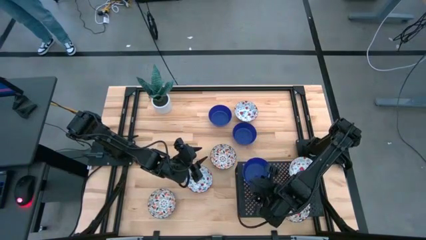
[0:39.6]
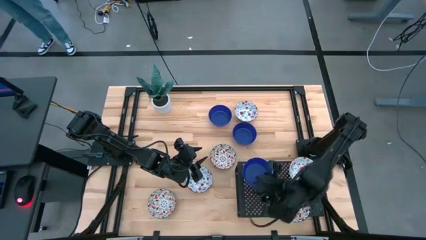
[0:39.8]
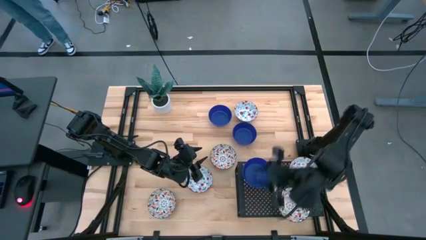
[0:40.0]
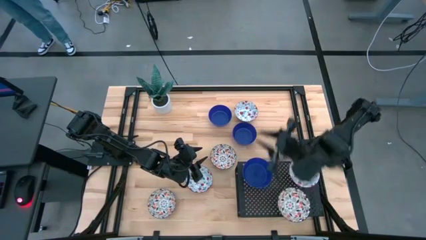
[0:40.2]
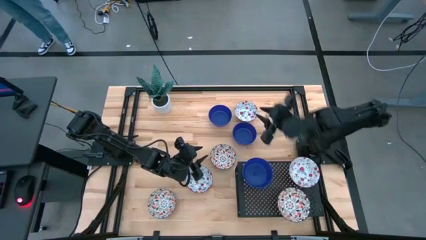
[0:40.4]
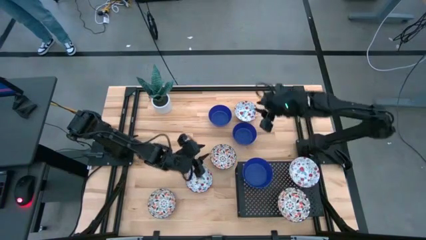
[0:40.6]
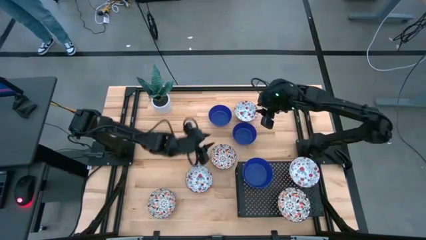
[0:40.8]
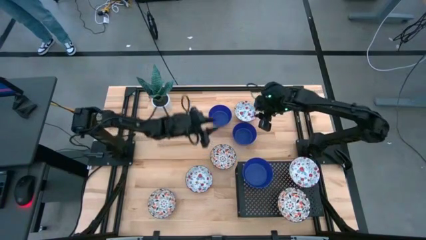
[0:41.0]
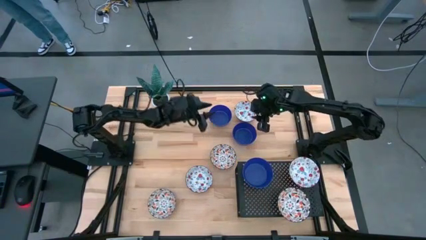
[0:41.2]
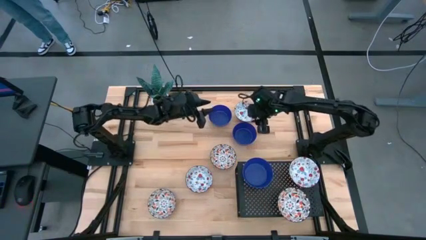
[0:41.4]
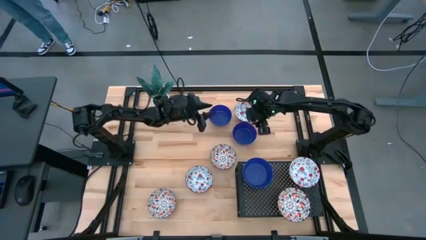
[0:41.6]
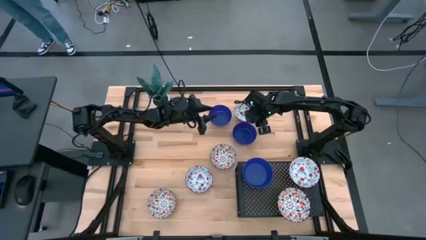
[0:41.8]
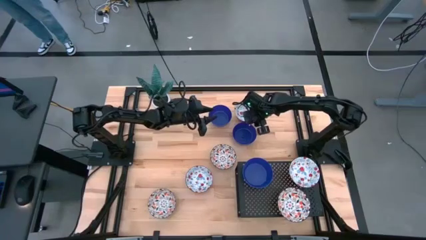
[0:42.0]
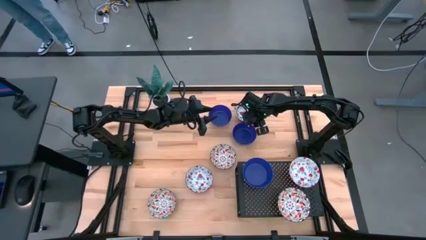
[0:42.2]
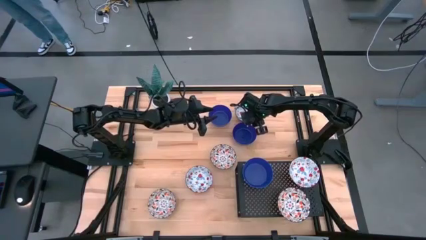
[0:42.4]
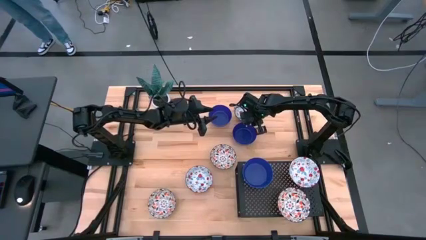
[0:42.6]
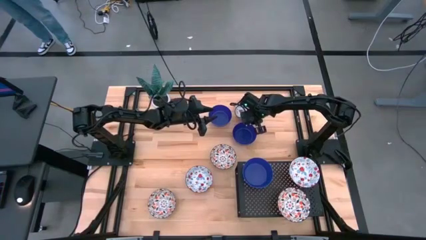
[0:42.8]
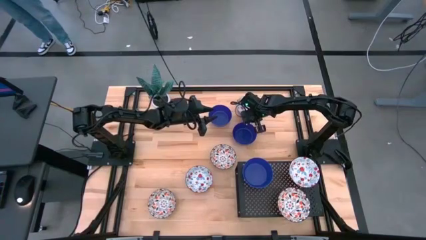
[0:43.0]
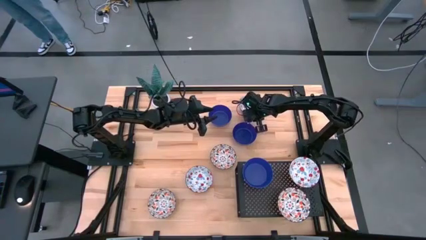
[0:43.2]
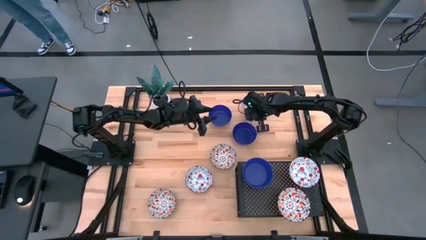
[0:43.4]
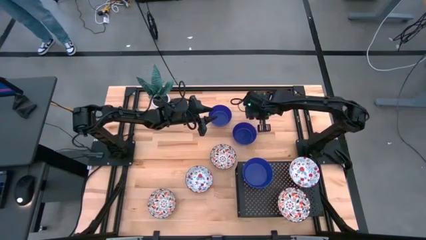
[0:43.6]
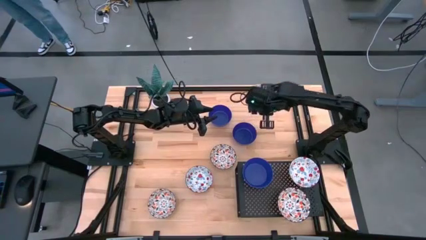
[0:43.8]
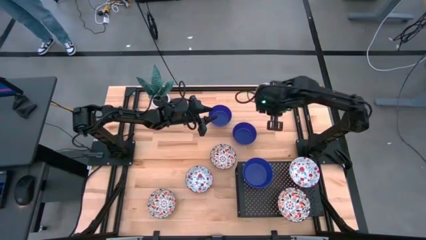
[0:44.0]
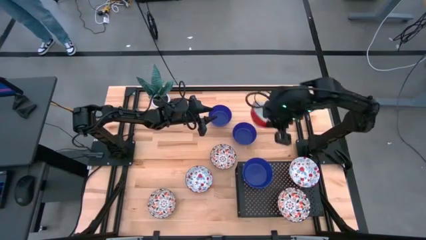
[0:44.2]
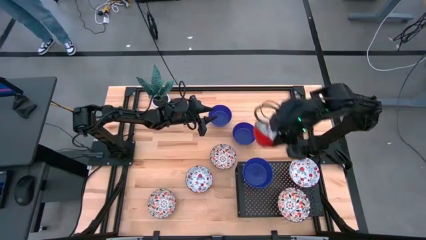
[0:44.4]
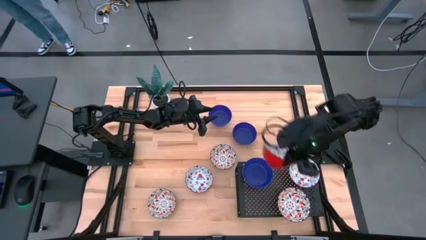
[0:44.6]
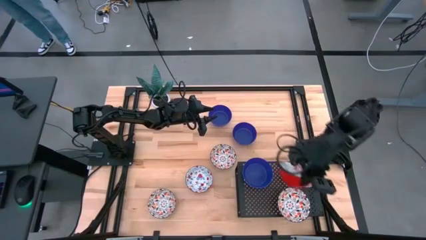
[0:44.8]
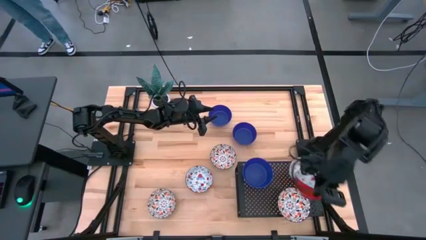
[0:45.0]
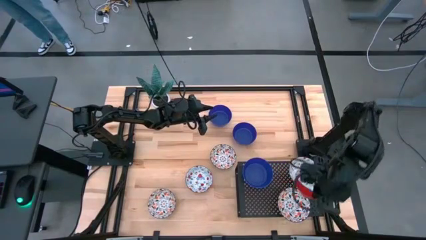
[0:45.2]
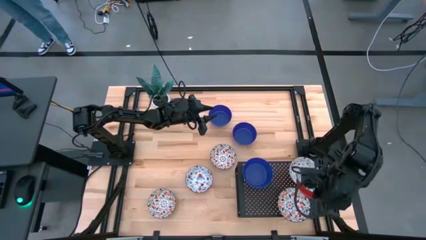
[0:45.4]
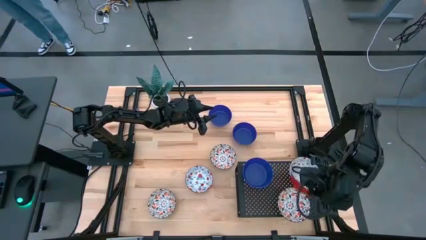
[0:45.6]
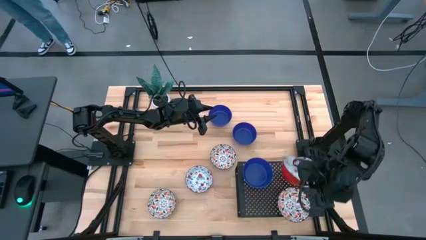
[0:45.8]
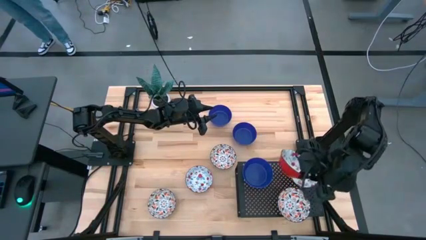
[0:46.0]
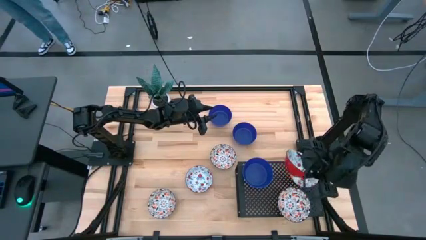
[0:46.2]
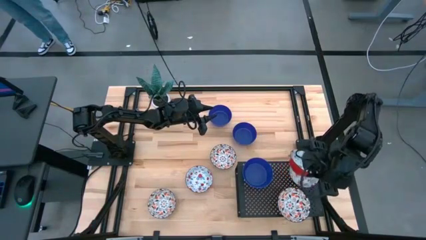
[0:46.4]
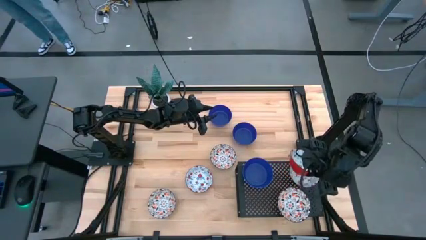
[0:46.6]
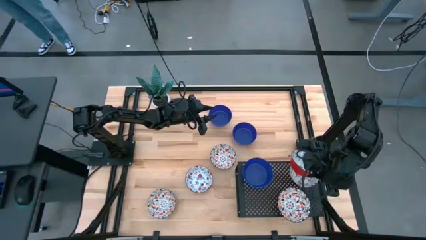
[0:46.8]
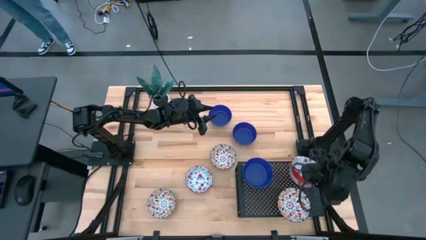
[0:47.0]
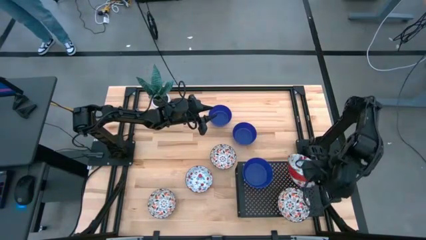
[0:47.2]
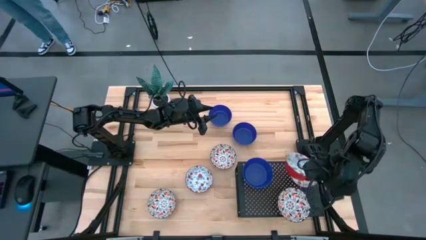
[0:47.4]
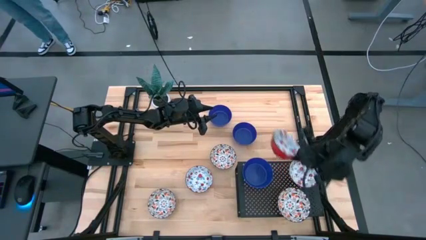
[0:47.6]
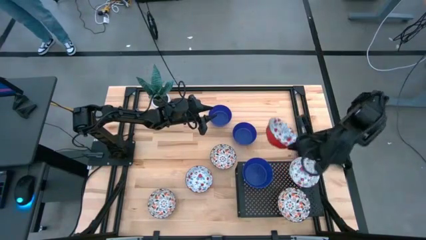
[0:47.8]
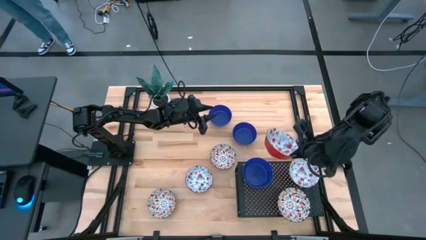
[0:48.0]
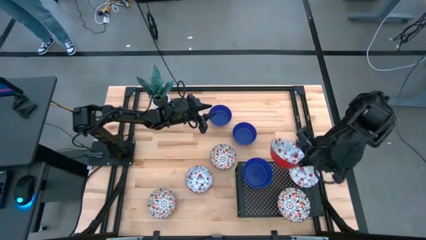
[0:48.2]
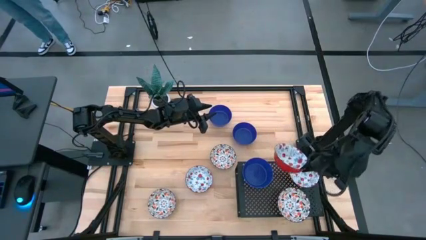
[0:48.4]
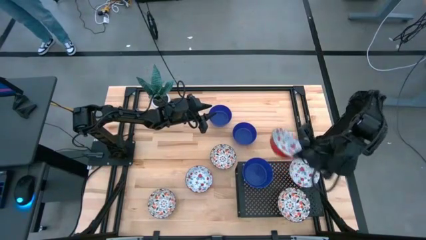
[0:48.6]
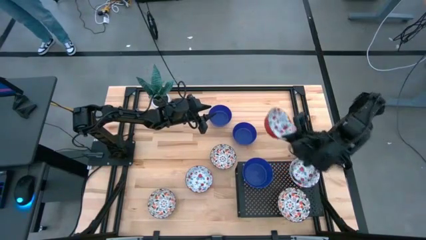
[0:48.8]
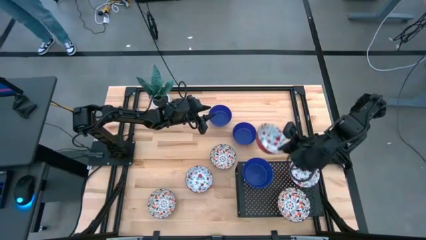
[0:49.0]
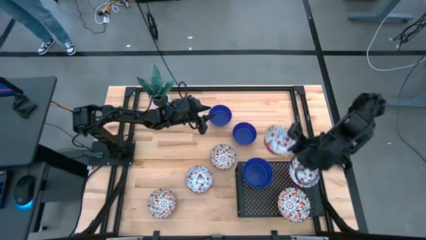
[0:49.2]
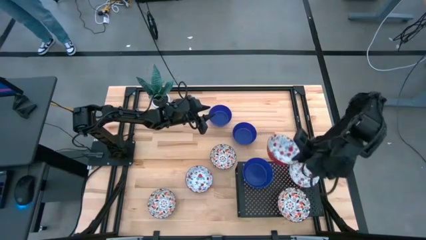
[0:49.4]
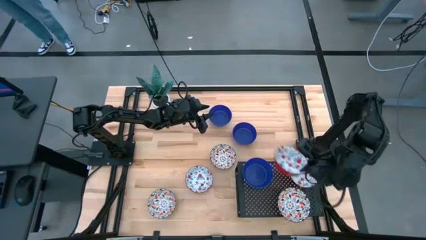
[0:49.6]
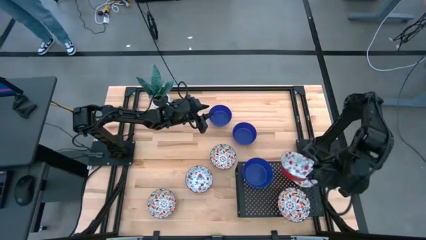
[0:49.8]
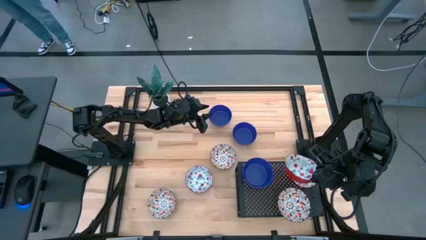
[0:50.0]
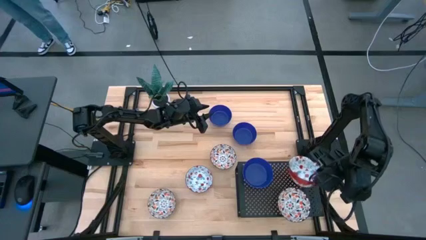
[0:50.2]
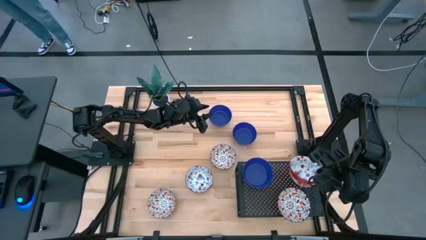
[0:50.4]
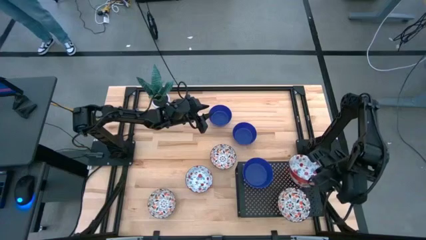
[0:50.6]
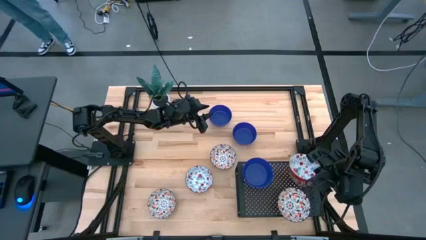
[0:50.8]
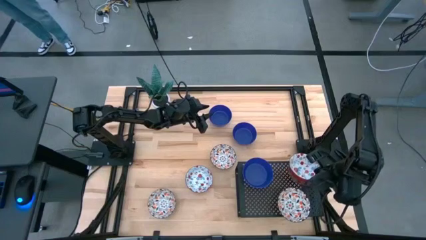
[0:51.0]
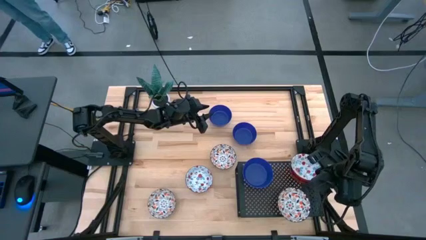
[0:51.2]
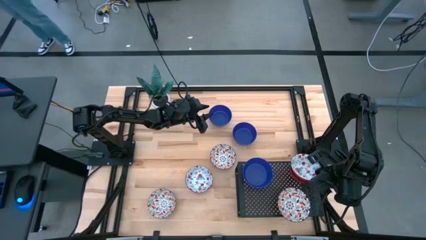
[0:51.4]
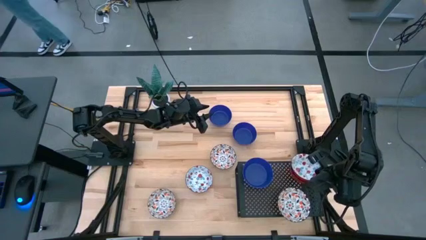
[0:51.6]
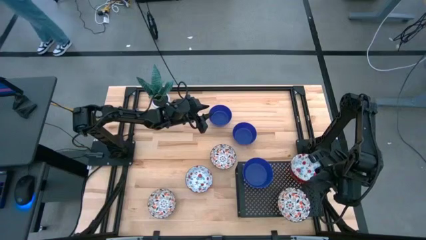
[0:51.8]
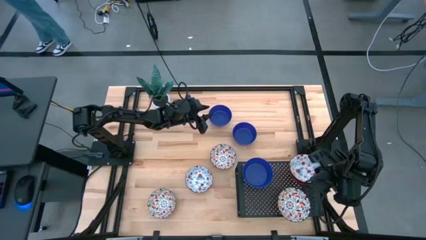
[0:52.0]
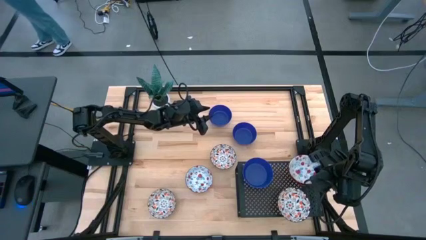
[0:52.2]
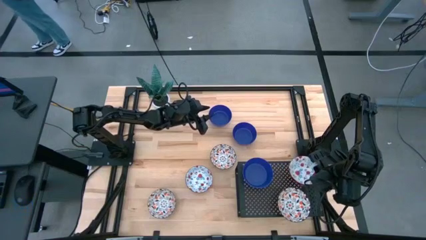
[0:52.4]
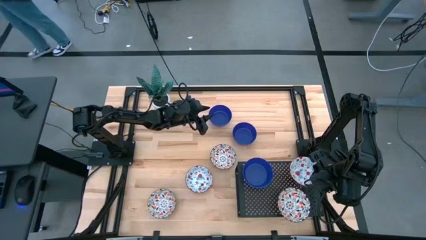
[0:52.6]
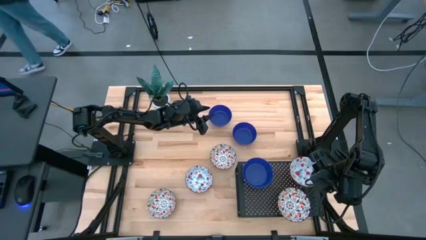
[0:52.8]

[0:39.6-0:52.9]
Task: Pick & Place Mini bowls
Stack the top red patterned bowl on the red patterned bowl on the shelf
